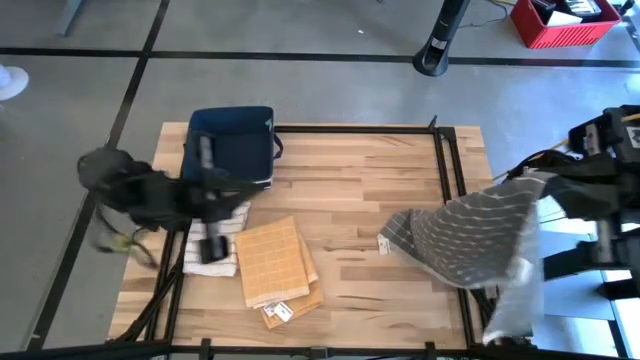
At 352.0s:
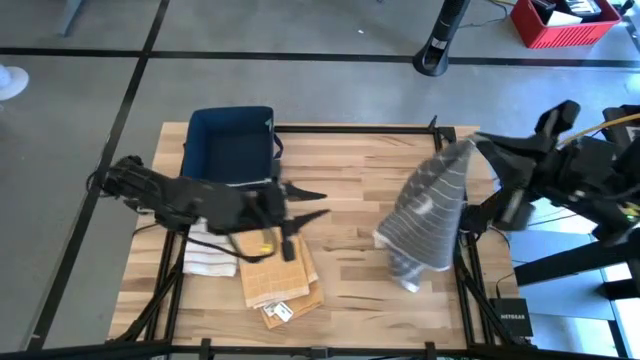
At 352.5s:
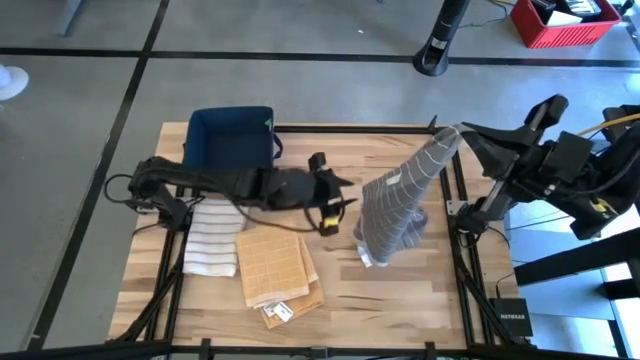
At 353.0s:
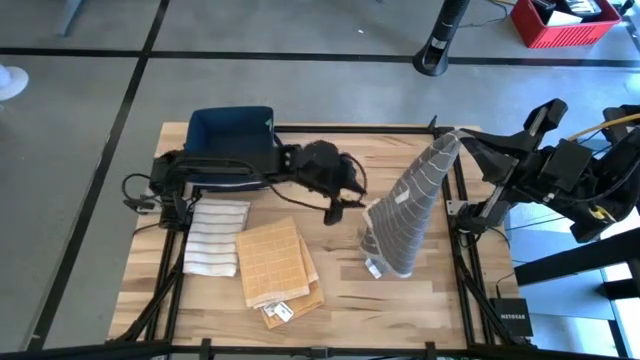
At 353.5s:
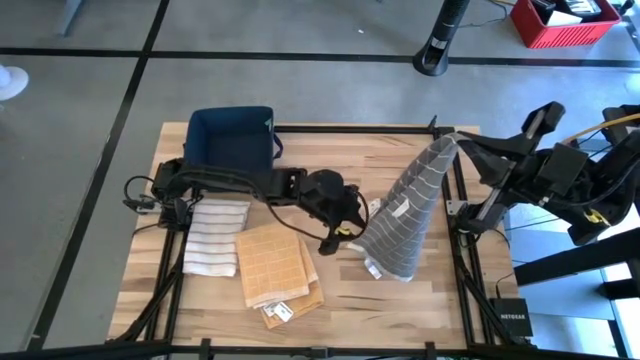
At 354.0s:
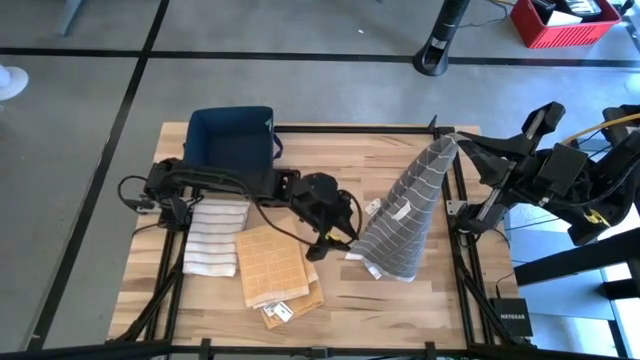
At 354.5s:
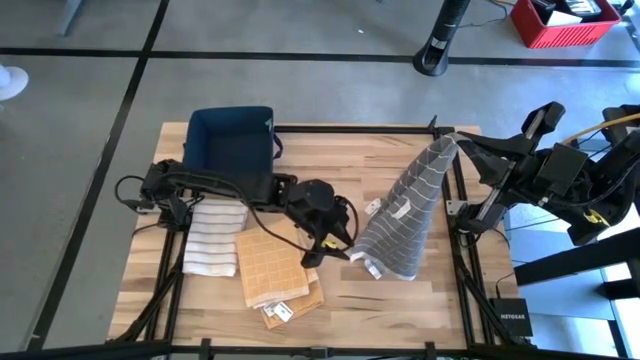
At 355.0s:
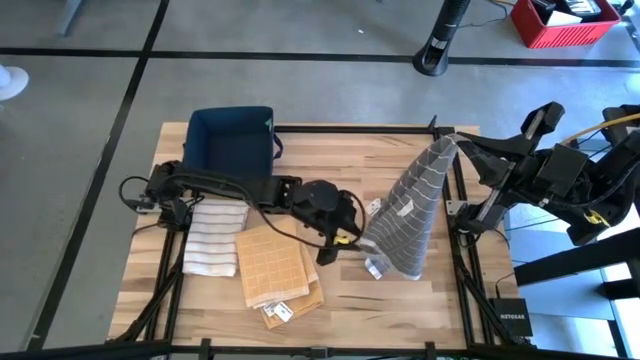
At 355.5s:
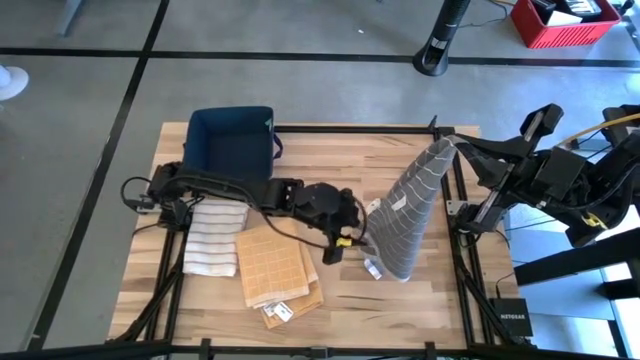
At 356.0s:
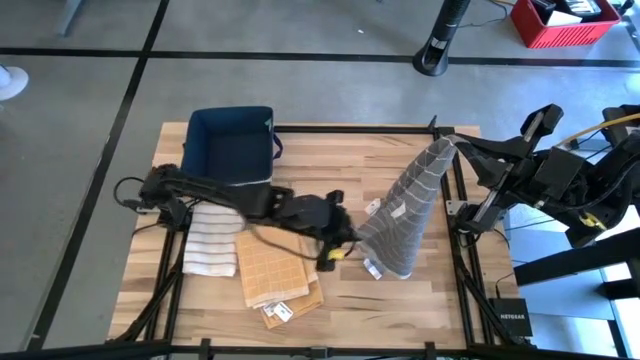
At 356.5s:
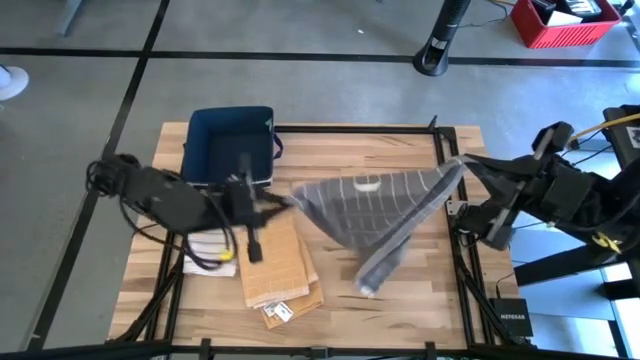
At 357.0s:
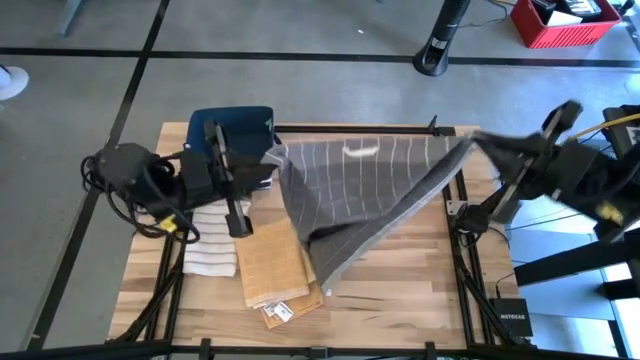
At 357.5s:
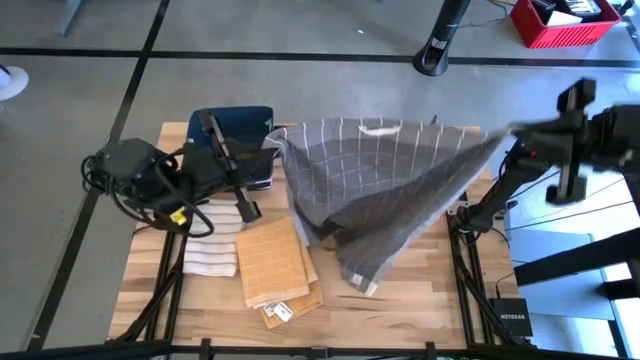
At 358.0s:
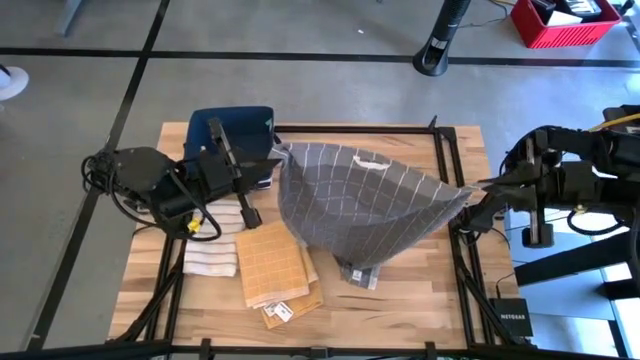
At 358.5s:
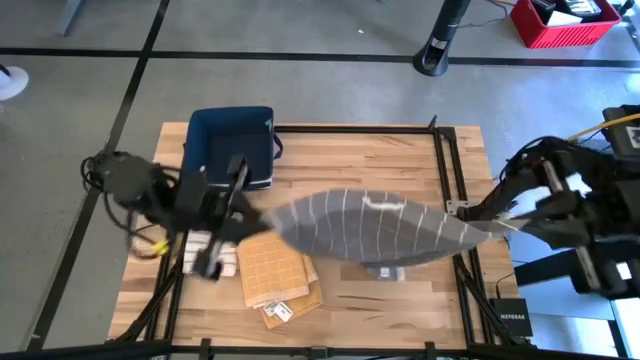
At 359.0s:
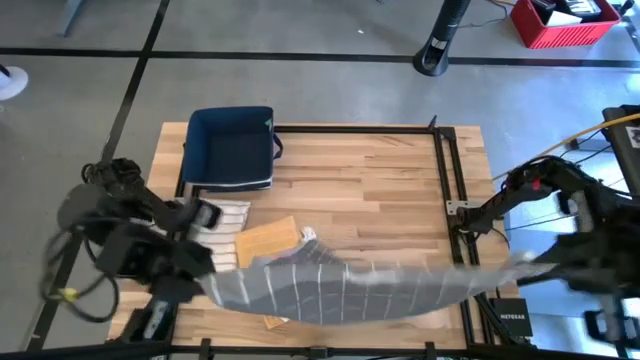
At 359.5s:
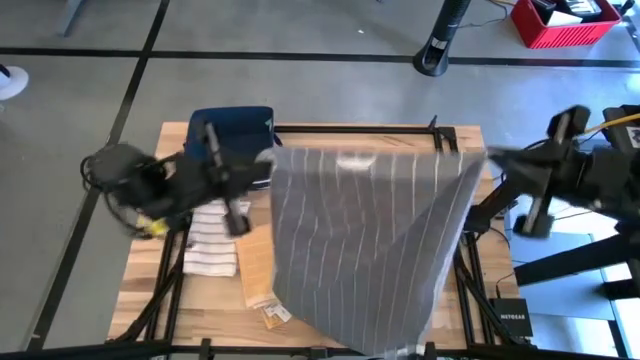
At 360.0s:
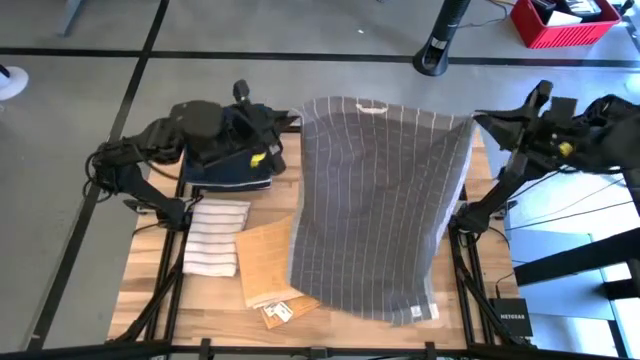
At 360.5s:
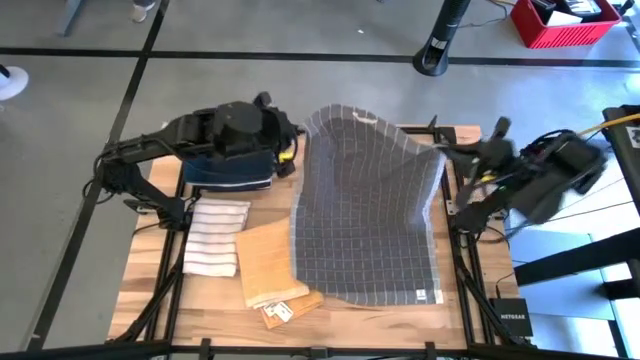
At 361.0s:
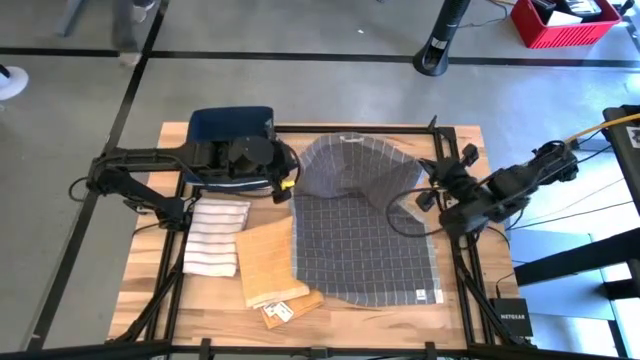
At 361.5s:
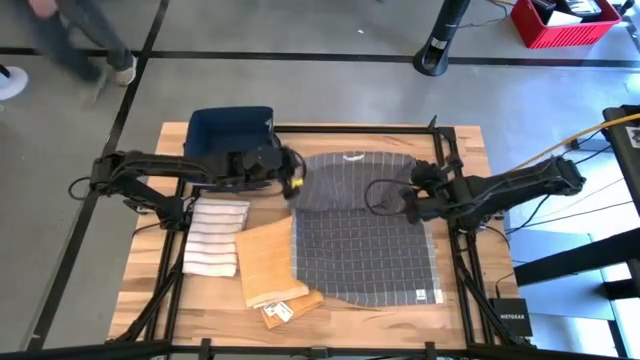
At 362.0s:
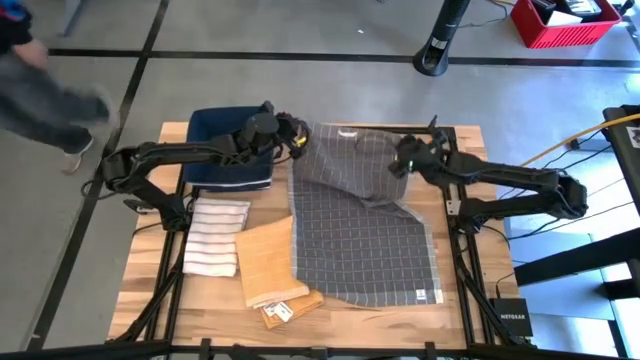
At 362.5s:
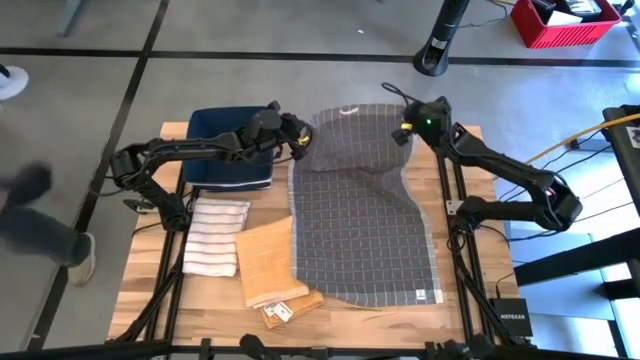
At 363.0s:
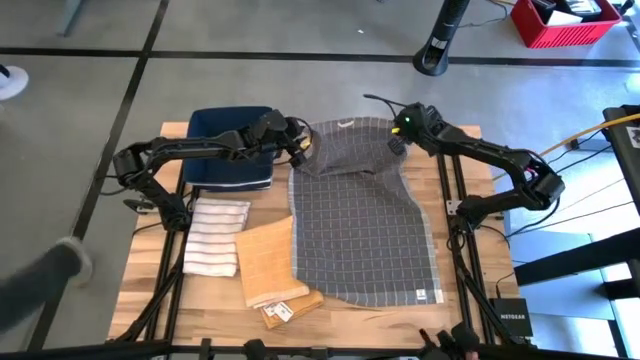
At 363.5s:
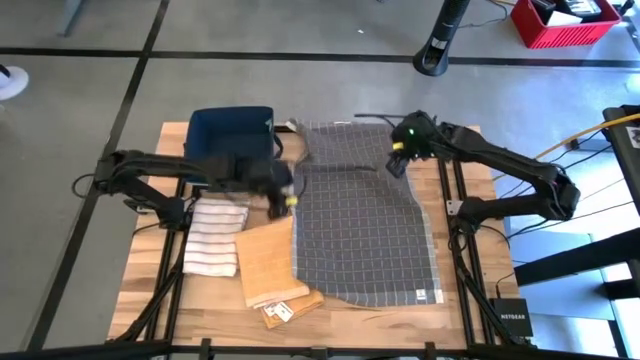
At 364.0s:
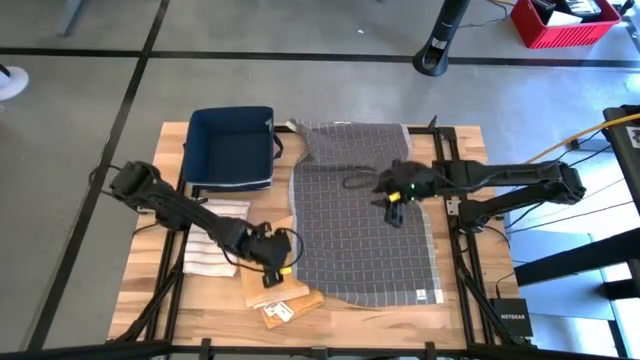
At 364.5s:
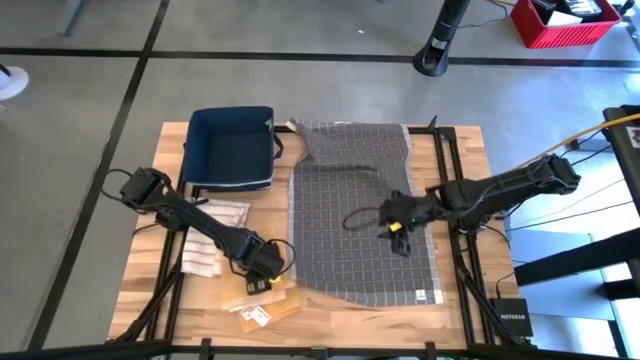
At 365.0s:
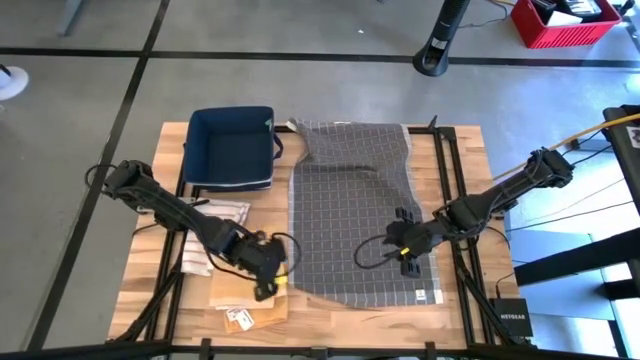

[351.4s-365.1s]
Task: Fold towel
Fold the gray pattern towel

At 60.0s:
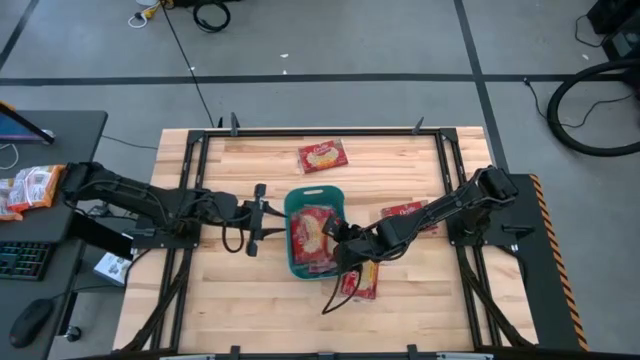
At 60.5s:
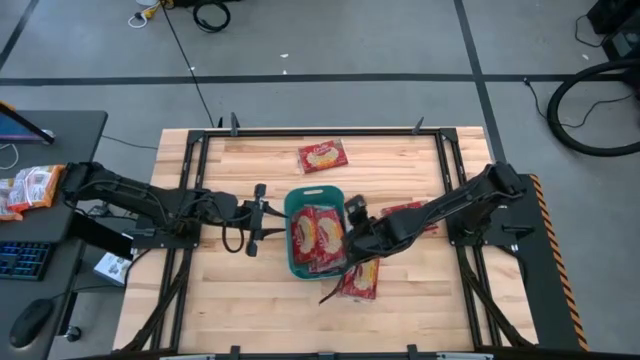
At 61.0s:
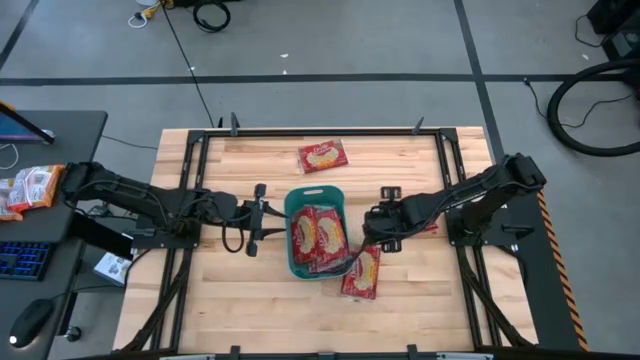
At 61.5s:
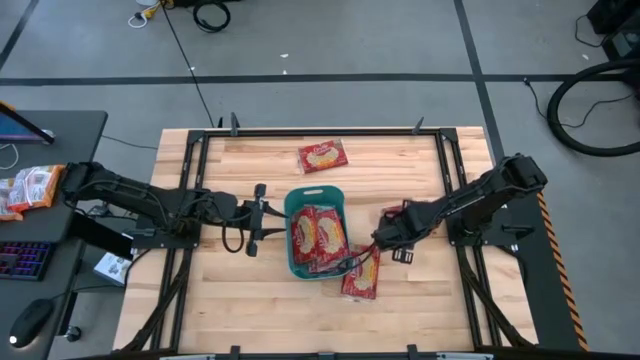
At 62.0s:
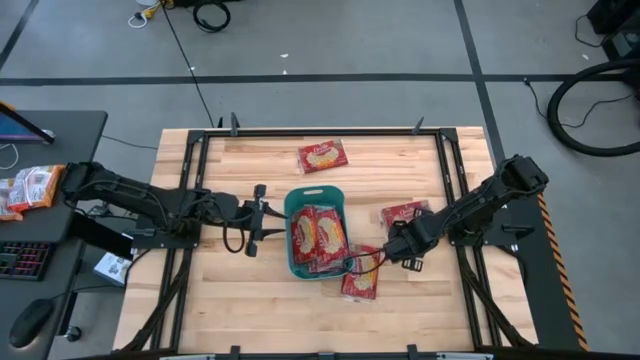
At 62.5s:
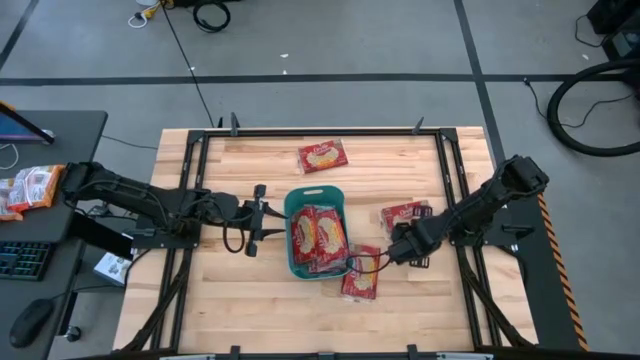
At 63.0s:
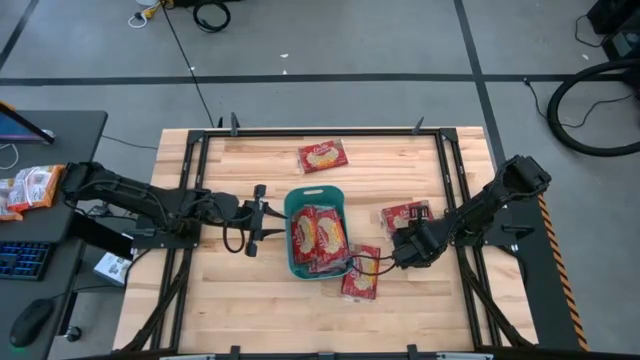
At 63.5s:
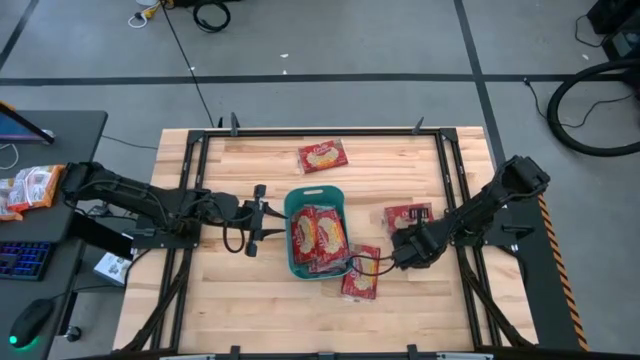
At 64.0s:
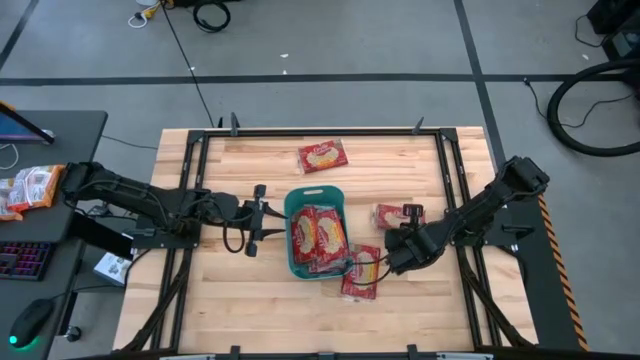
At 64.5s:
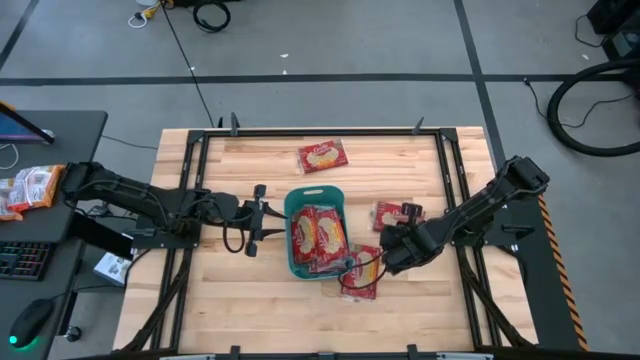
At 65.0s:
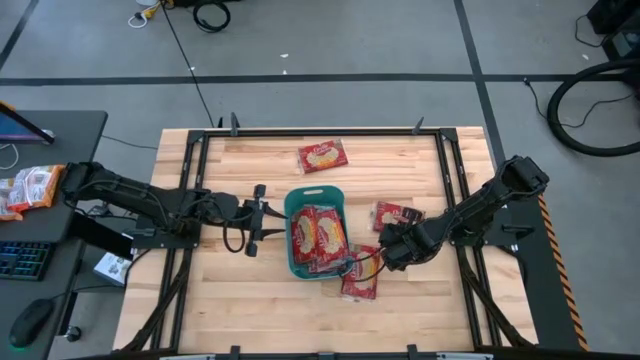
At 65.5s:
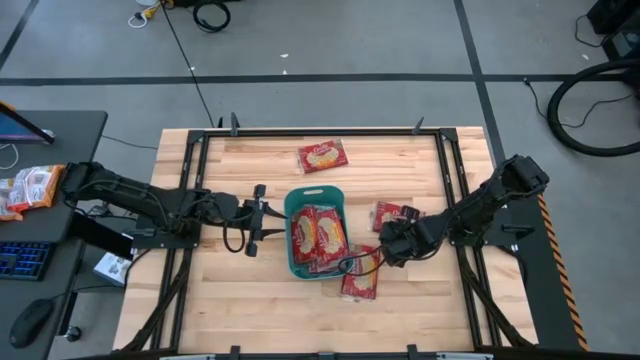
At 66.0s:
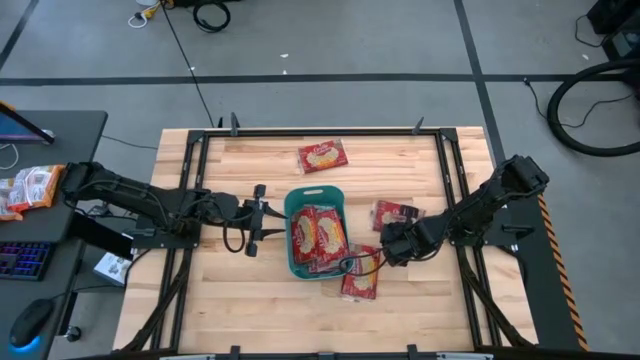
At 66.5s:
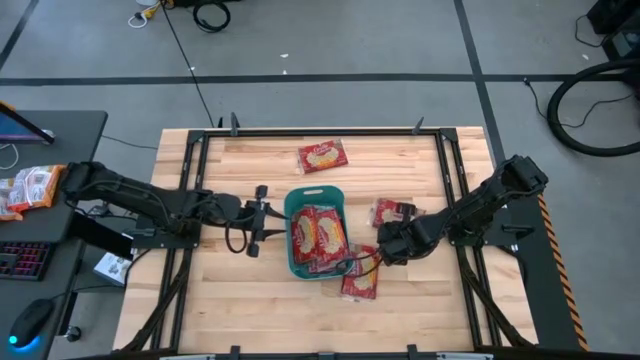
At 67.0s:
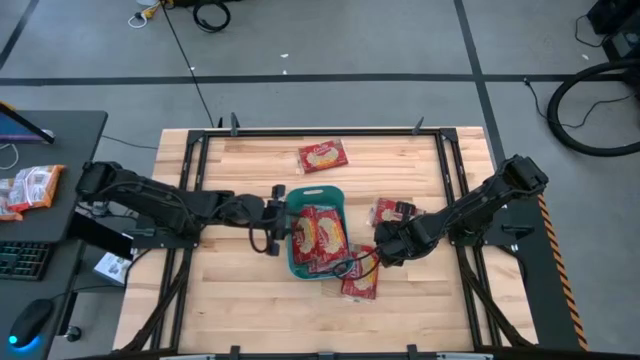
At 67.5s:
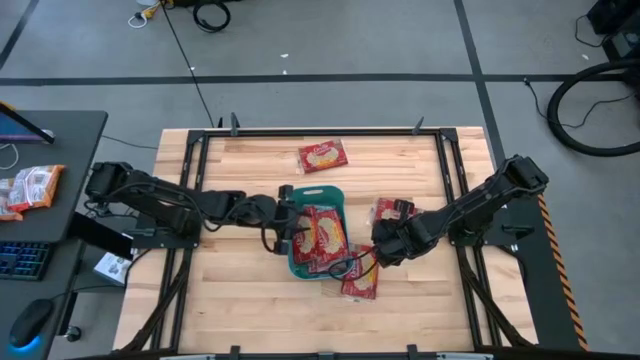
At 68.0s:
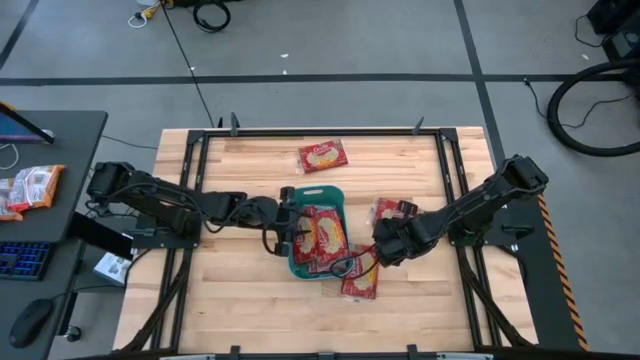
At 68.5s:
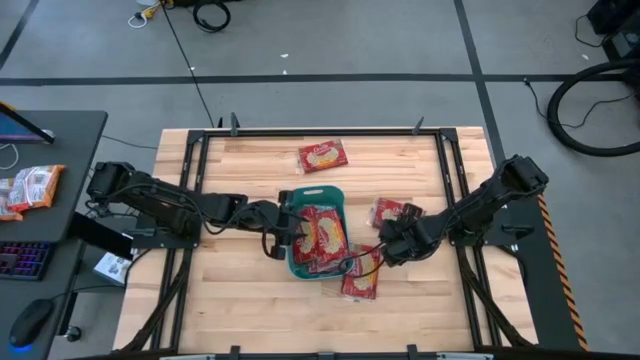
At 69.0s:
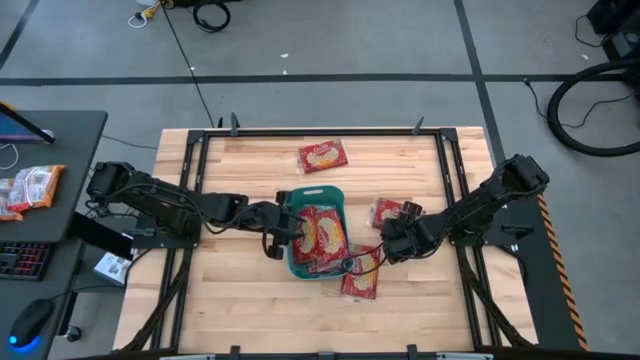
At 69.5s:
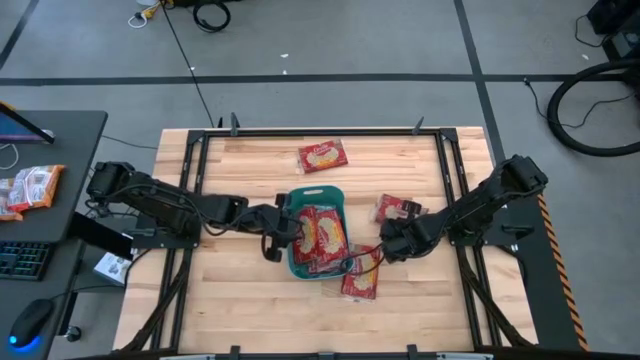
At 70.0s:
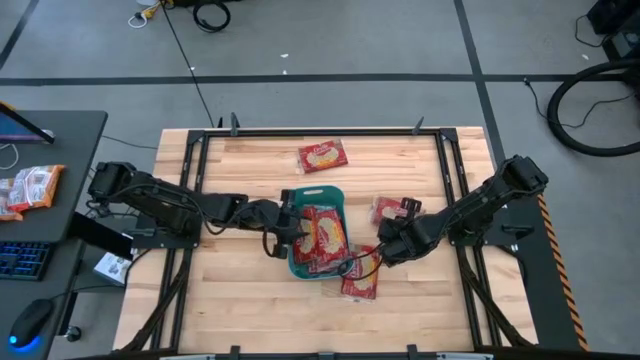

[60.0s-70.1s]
Task: Sort popcorn bags into baskets
Put the red popcorn bag into the green bin
